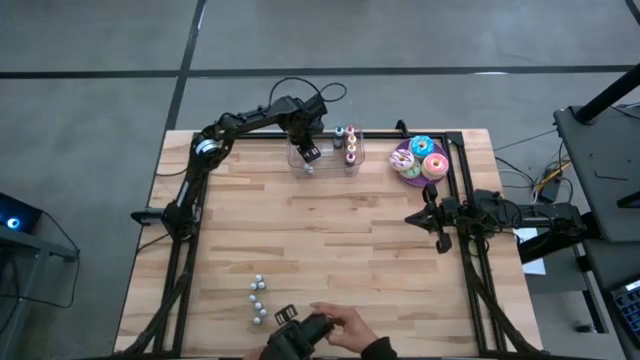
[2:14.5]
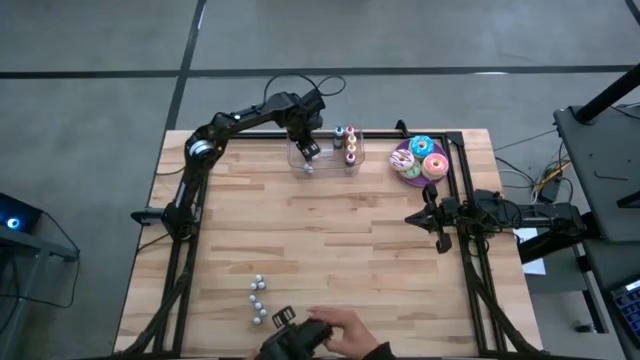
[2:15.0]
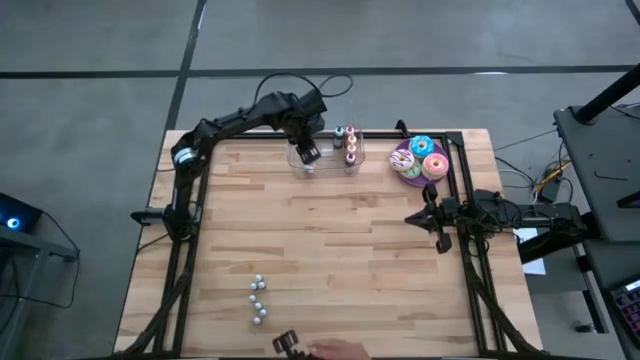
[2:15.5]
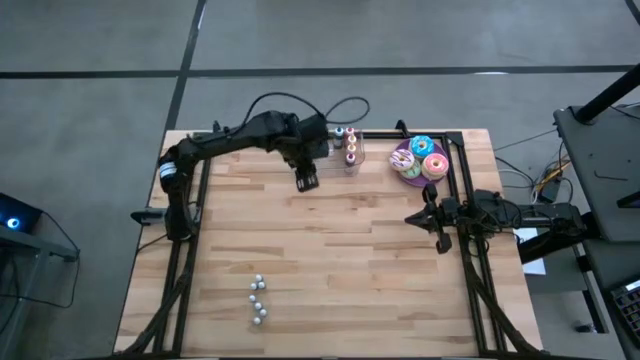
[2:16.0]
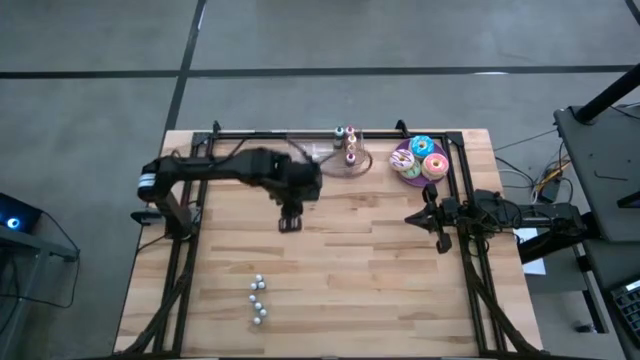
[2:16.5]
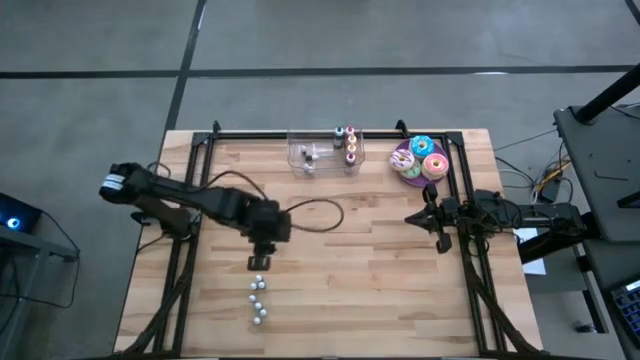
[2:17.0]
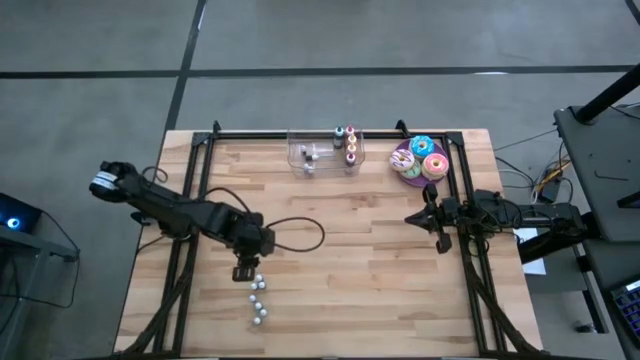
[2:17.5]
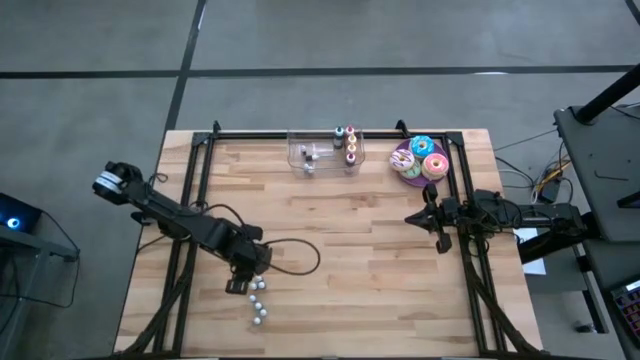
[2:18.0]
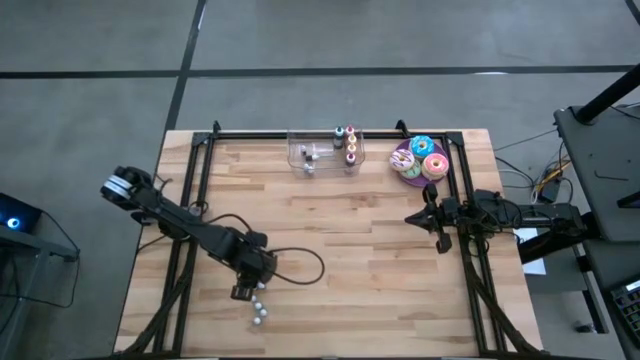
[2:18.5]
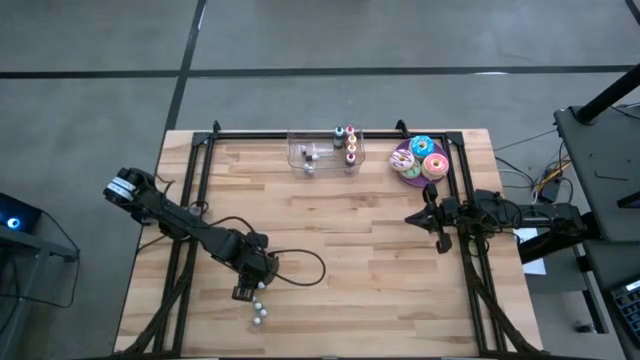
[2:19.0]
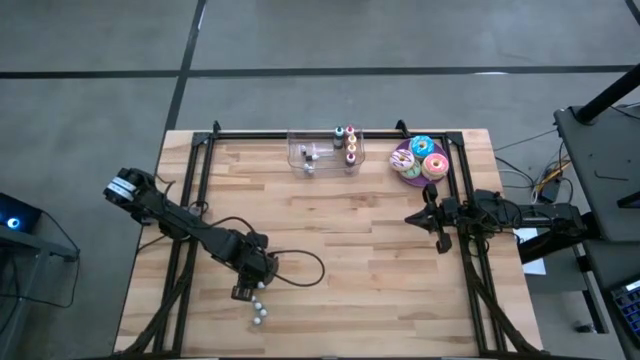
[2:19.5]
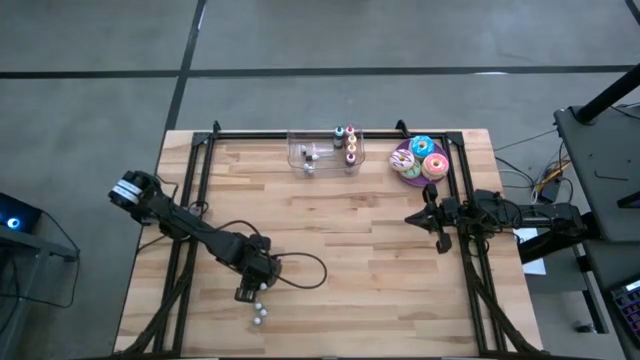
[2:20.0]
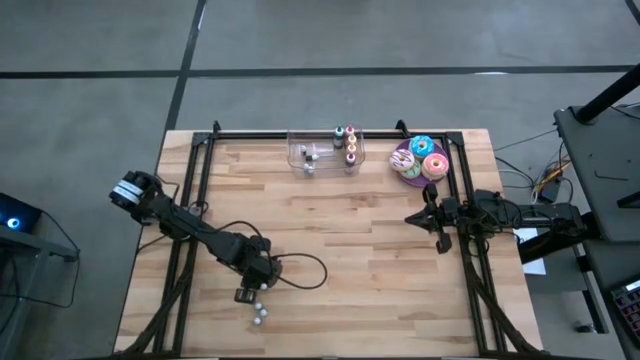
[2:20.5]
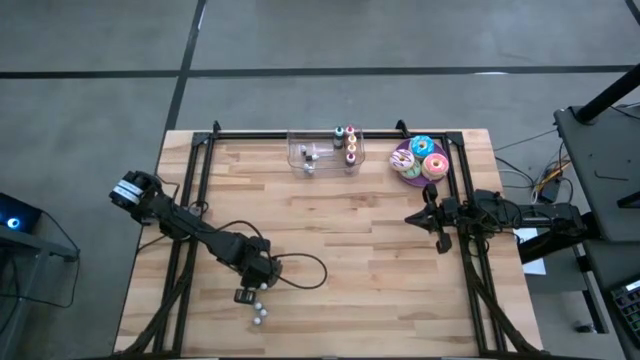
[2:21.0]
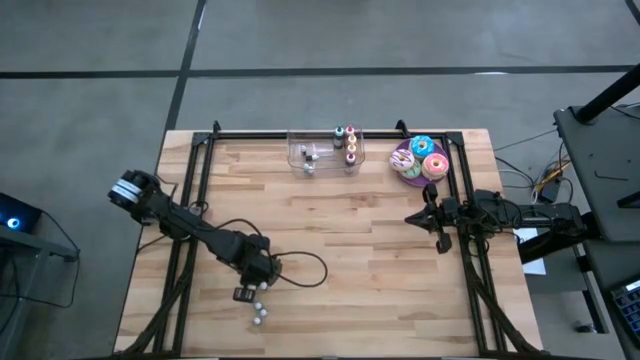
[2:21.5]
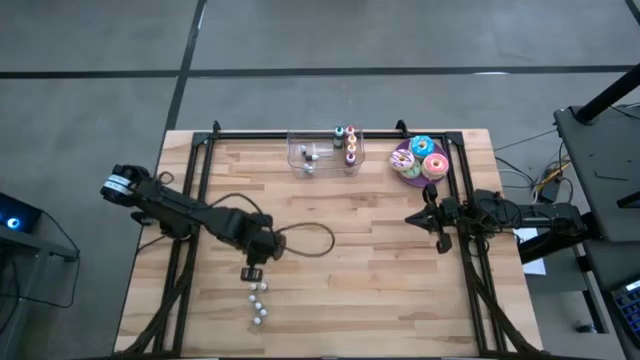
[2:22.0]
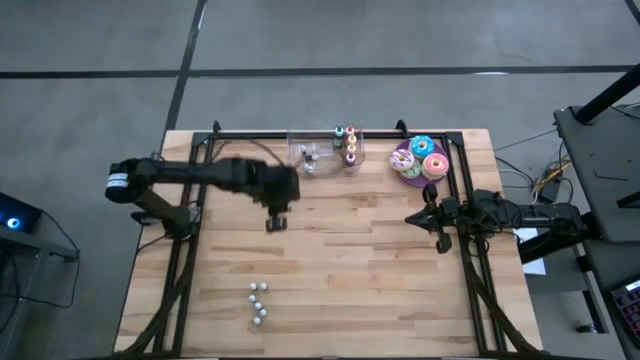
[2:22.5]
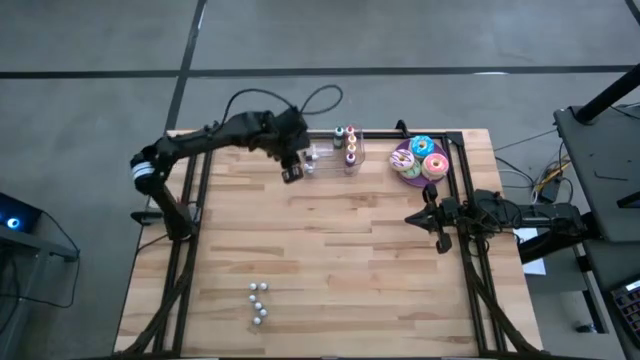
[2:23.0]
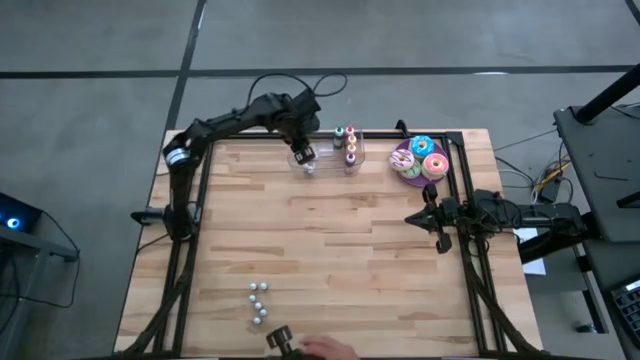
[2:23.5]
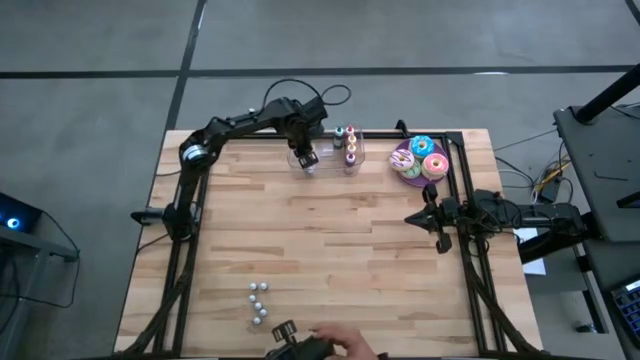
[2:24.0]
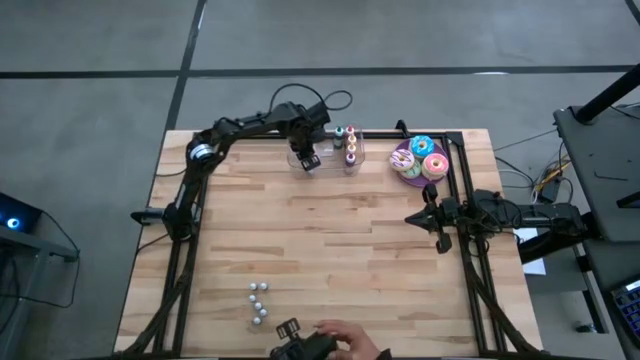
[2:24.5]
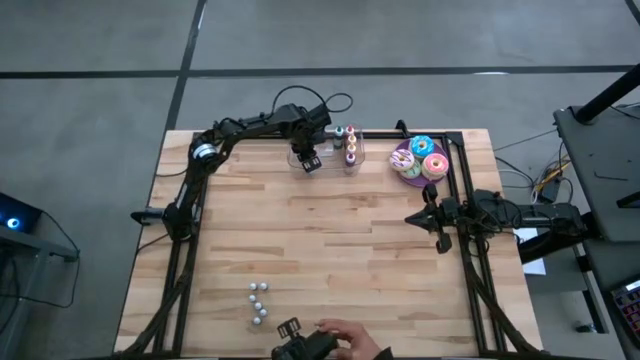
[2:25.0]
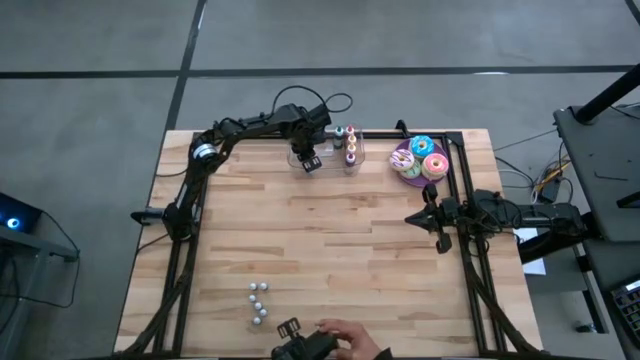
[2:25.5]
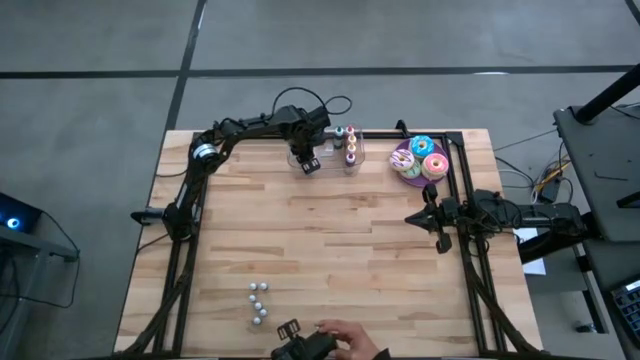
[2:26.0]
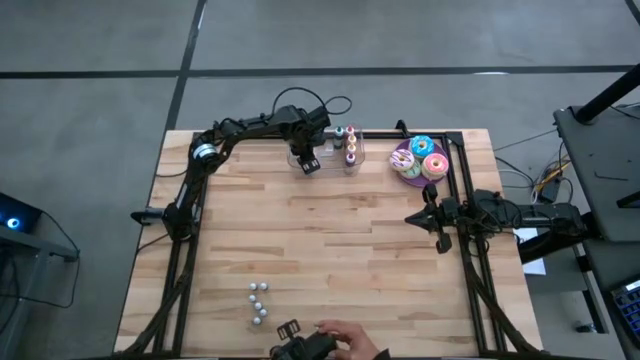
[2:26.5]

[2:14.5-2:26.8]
Task: Pick & Place food coloring
Put the small top black food coloring bottle into the transparent bin

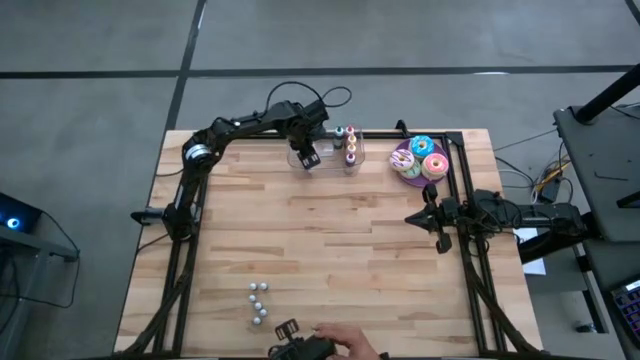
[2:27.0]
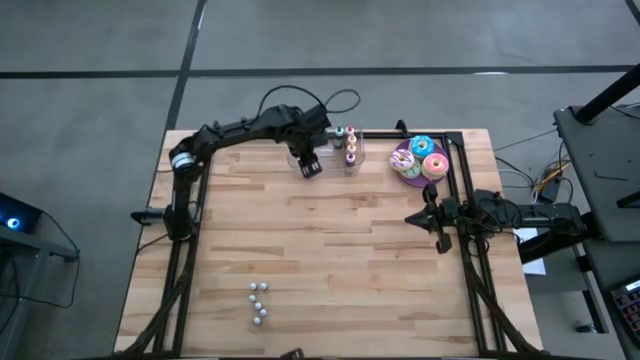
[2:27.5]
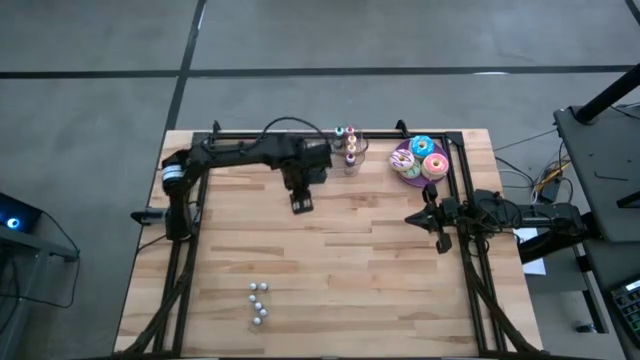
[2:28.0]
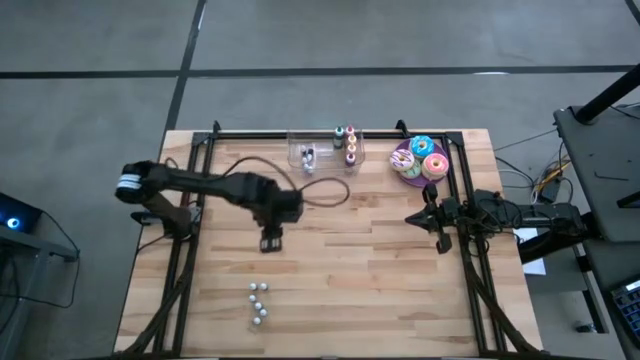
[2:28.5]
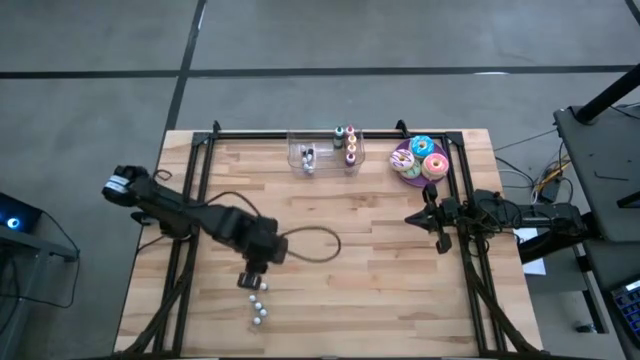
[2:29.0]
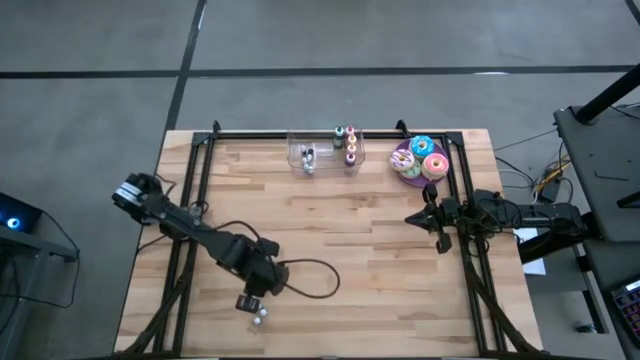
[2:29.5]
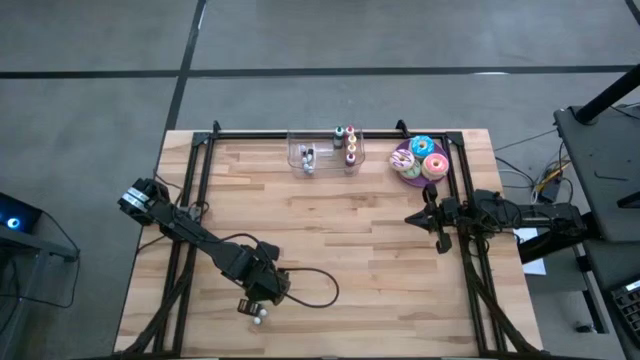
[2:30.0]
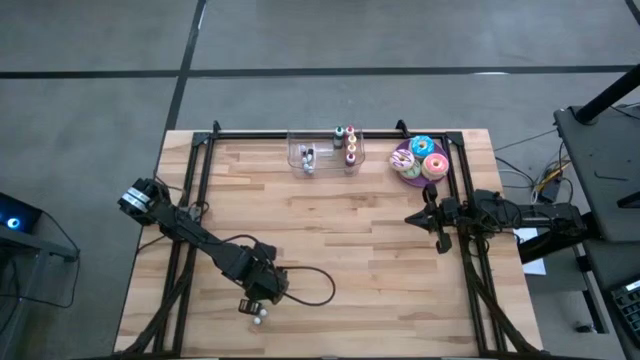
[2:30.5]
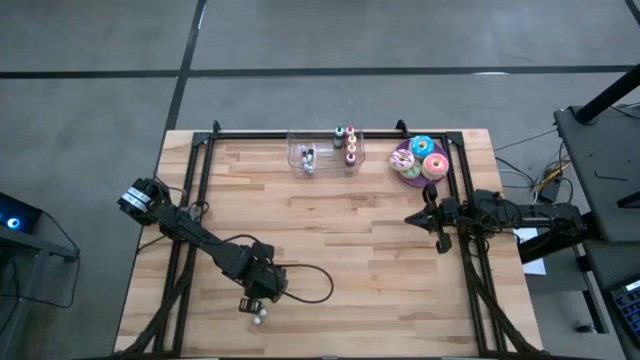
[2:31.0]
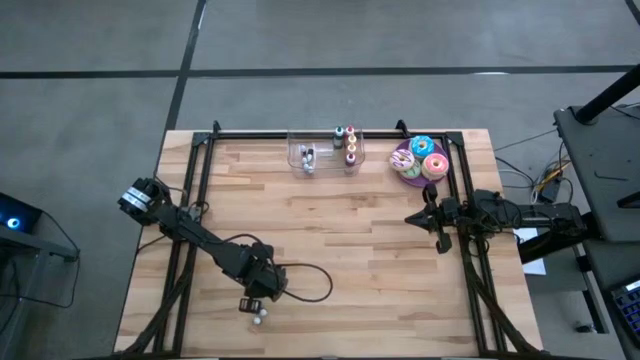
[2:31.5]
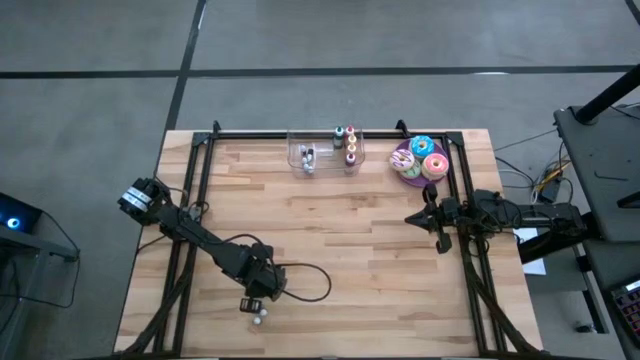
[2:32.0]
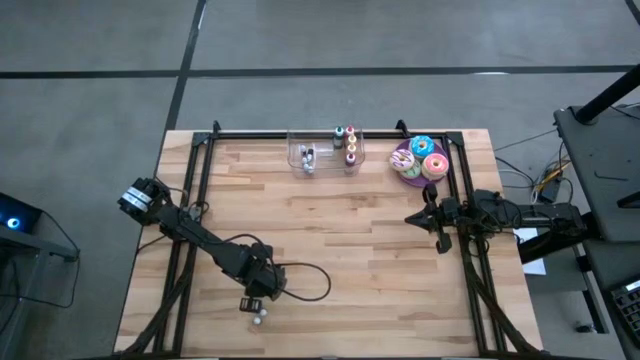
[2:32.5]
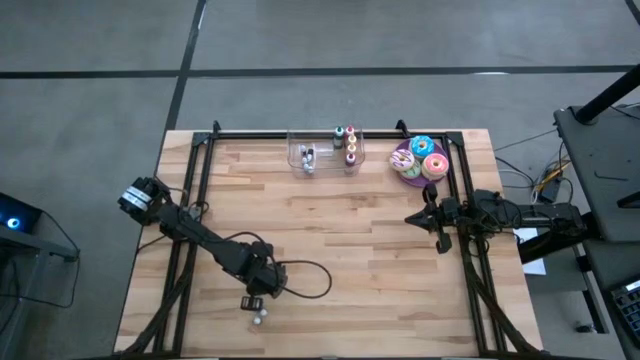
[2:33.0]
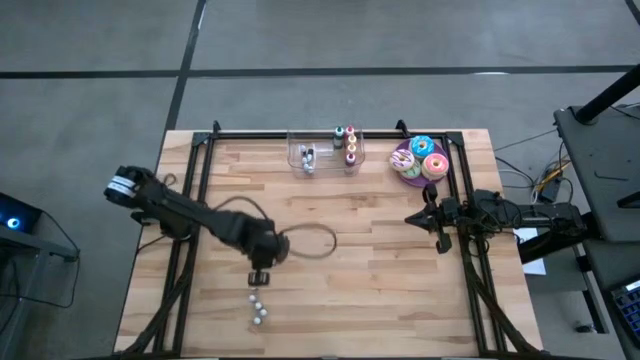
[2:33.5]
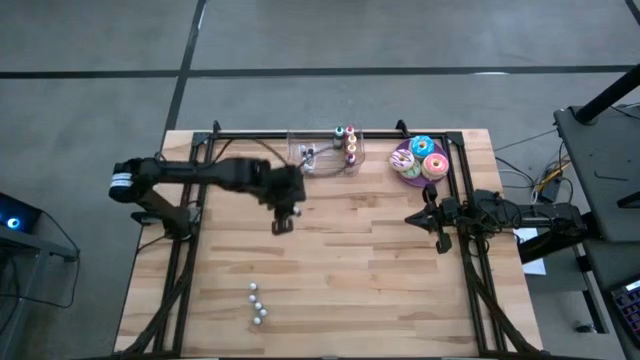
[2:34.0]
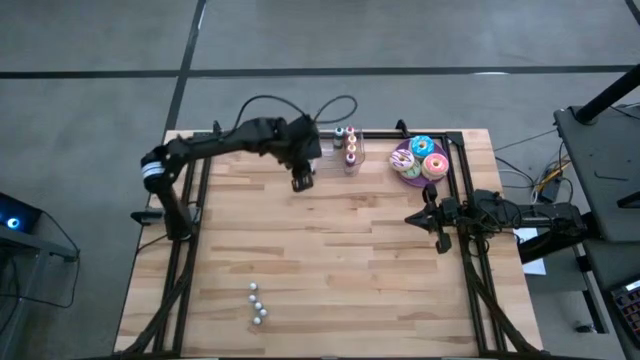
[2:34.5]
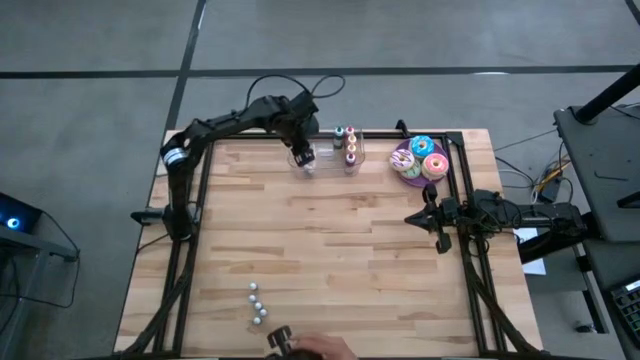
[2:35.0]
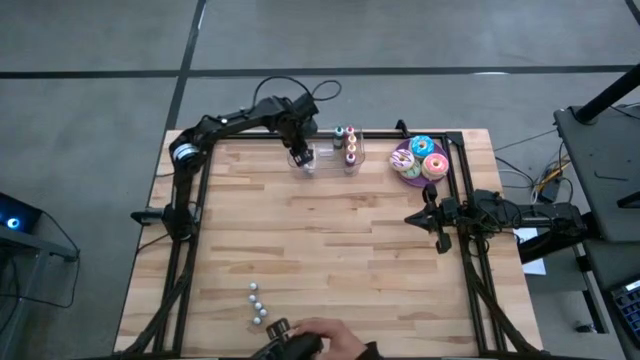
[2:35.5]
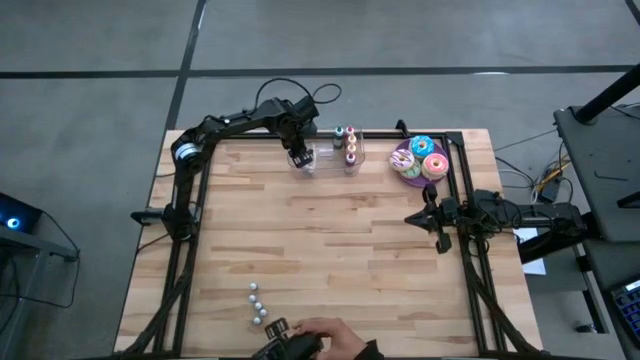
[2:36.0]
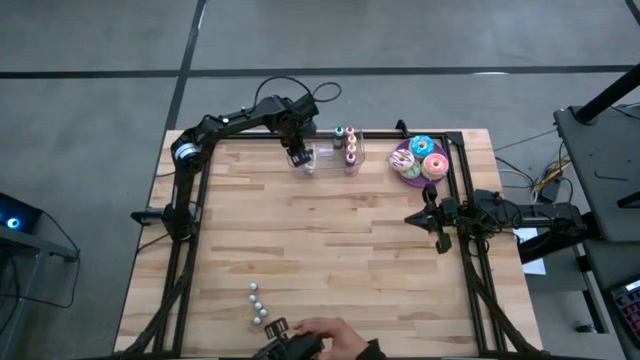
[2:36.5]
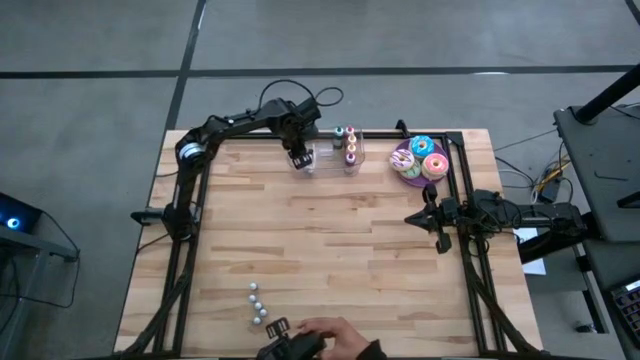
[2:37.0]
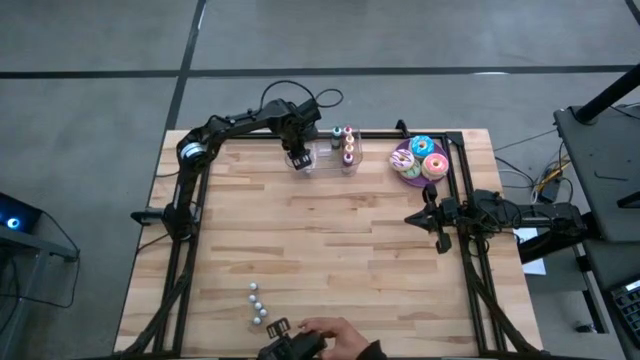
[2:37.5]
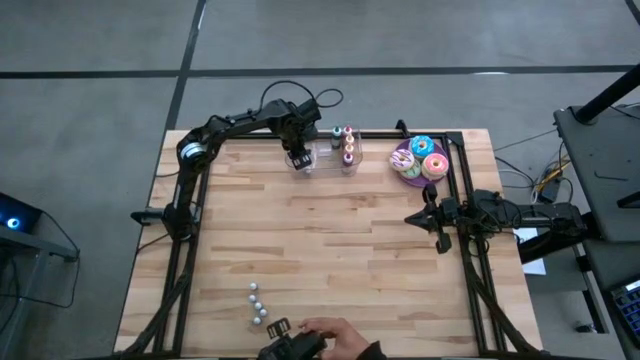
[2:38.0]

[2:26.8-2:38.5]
Put the small blue food coloring bottle into the transparent bin
